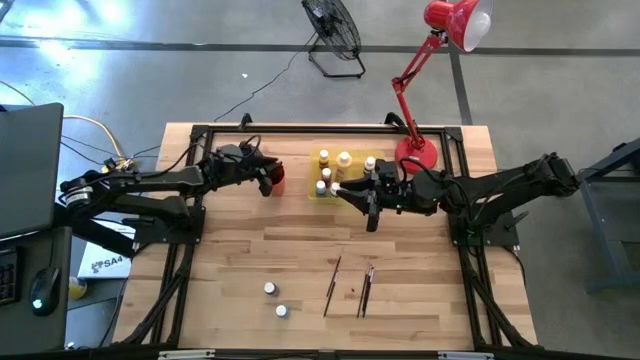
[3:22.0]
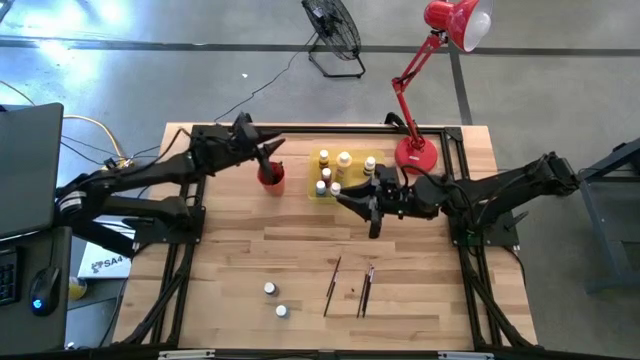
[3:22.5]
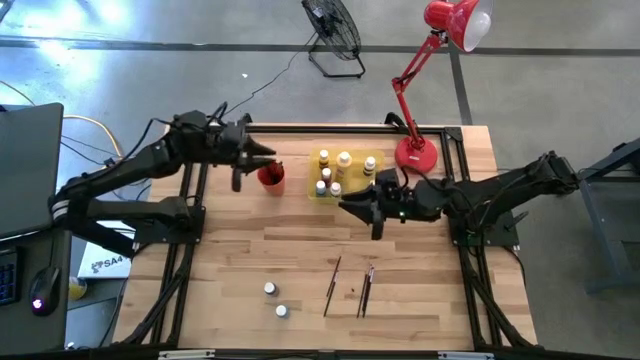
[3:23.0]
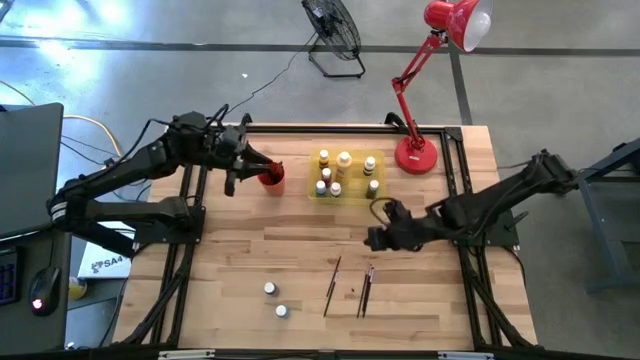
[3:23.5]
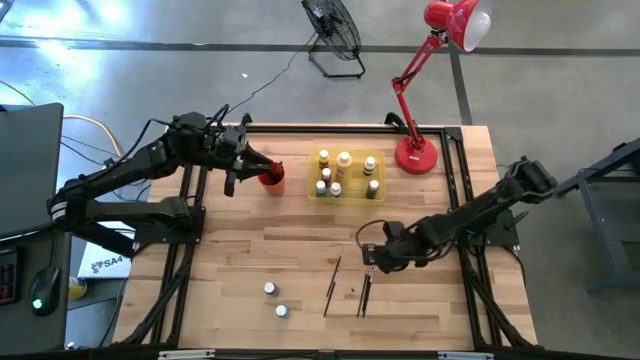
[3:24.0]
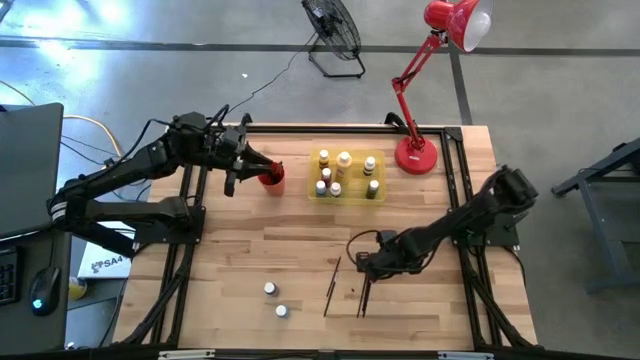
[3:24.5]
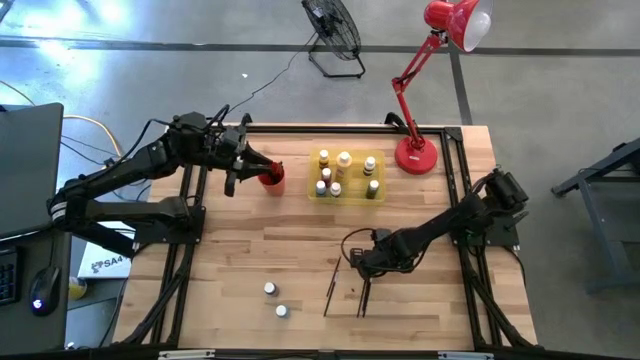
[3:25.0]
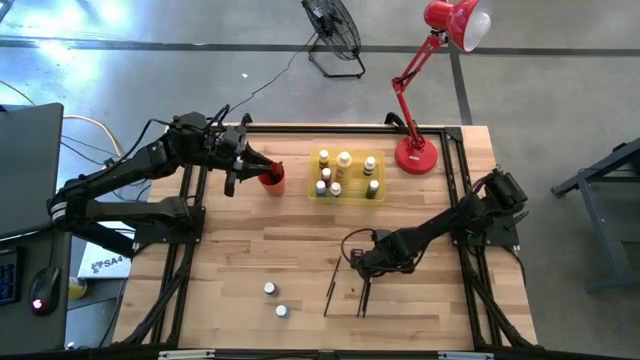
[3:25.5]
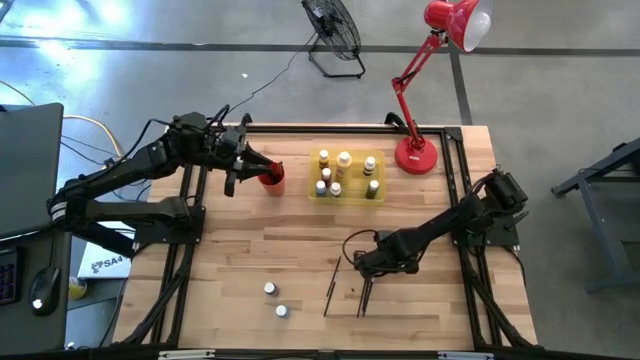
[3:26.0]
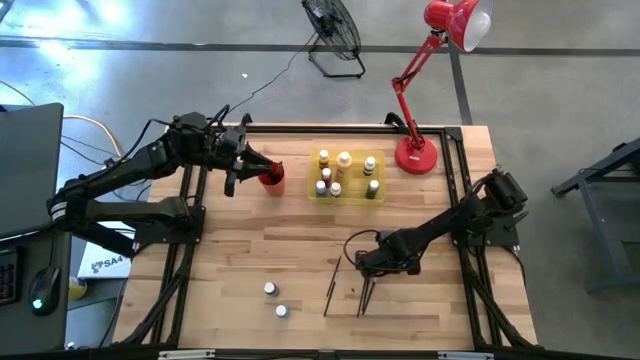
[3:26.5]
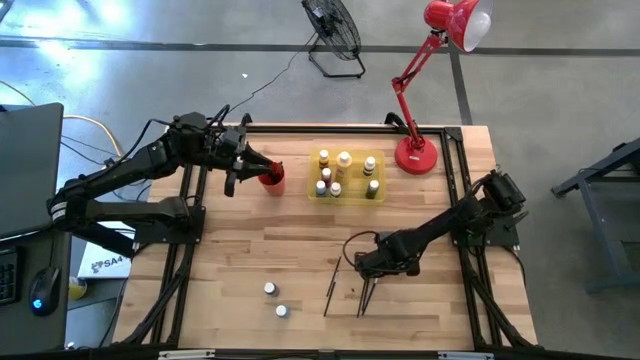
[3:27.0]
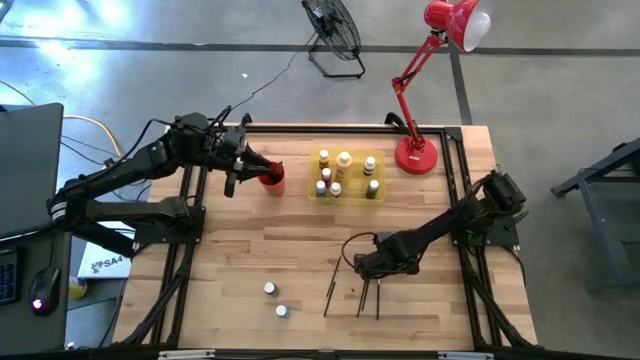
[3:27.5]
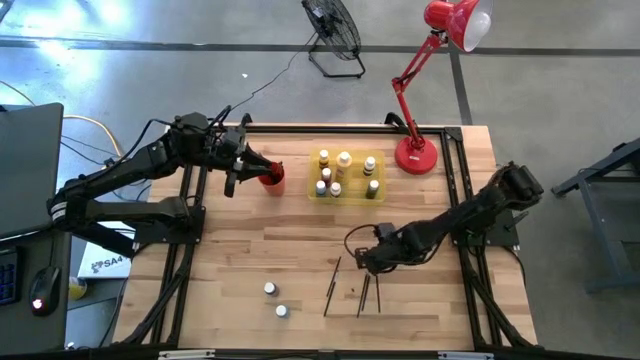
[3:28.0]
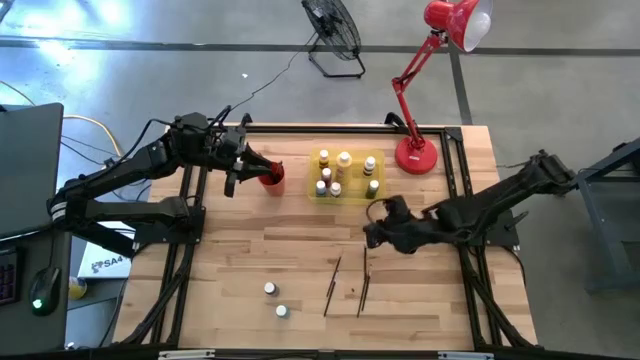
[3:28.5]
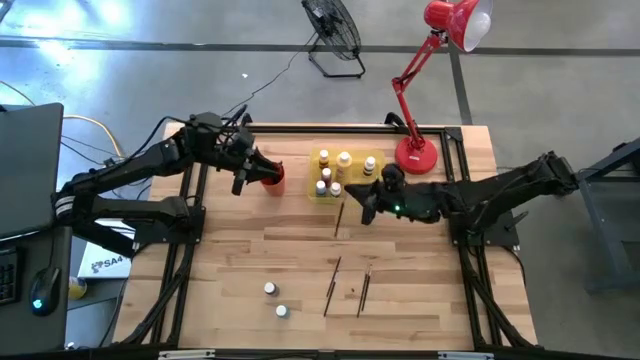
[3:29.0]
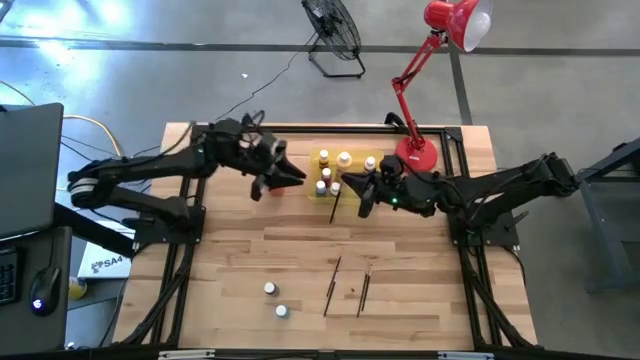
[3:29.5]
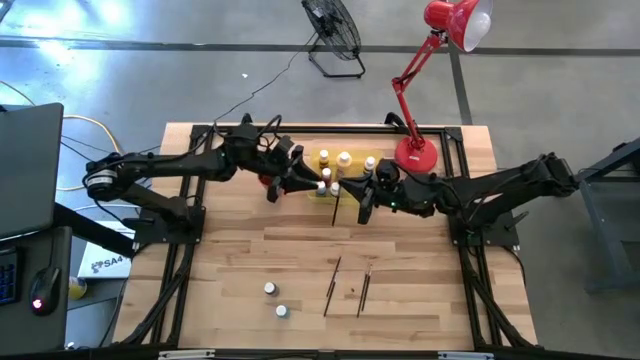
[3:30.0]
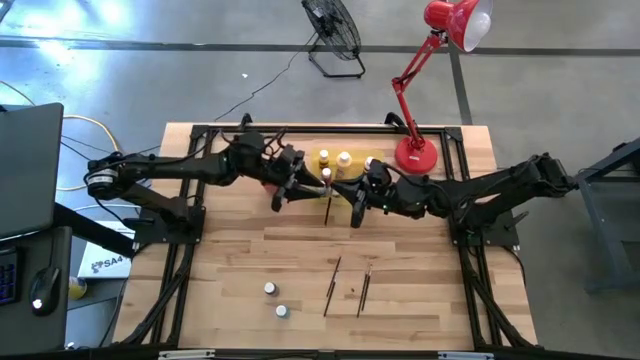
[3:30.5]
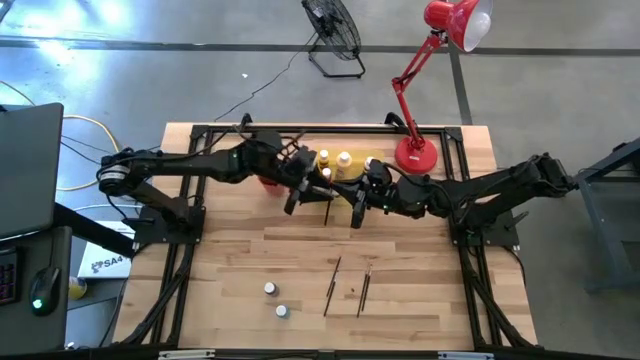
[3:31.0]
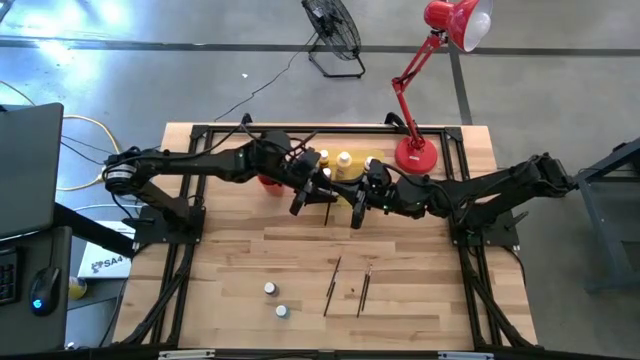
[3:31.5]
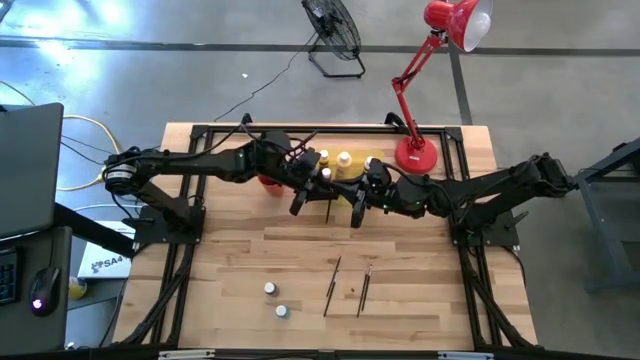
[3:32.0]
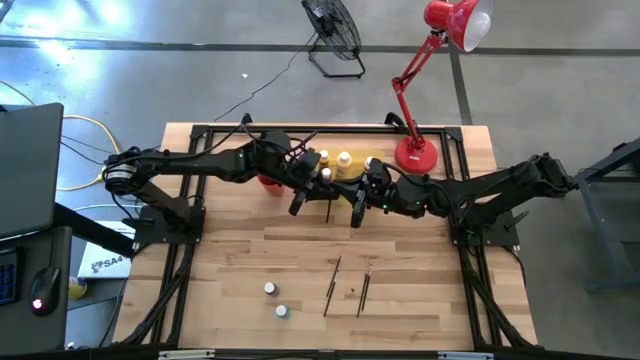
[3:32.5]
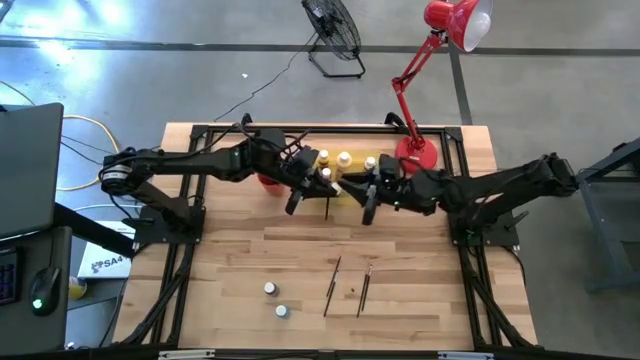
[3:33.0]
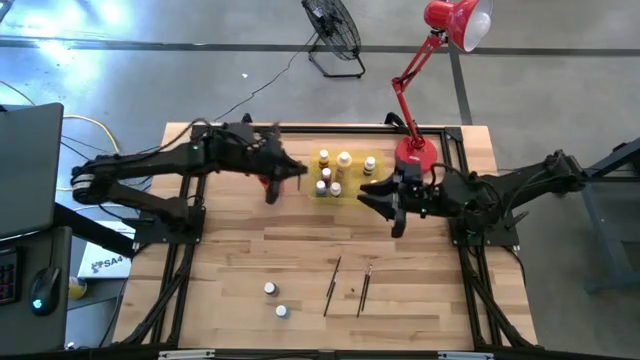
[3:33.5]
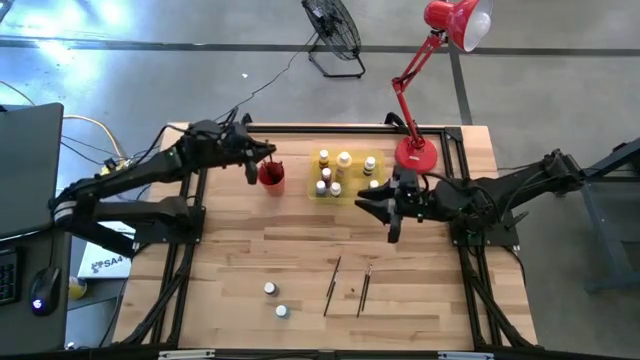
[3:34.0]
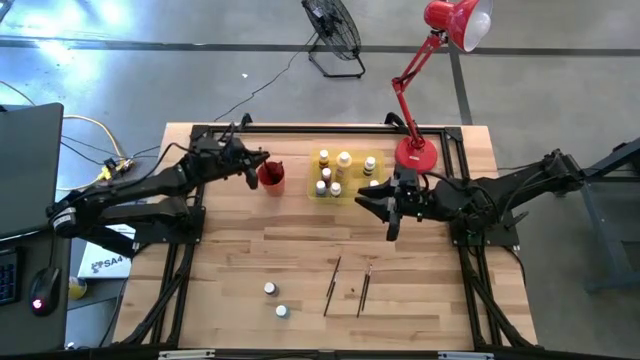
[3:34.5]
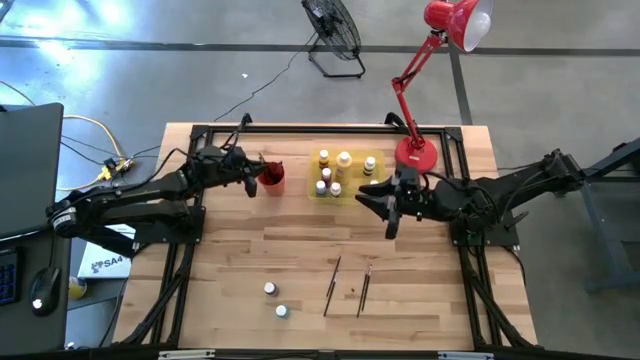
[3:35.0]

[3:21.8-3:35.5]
Task: Pick & Place Paint Supplies
Put the silver paintbrush into the orange cup

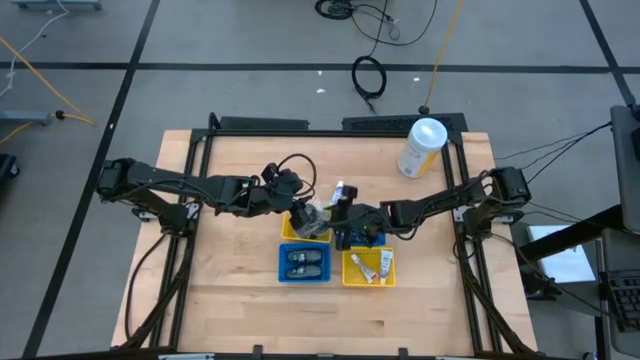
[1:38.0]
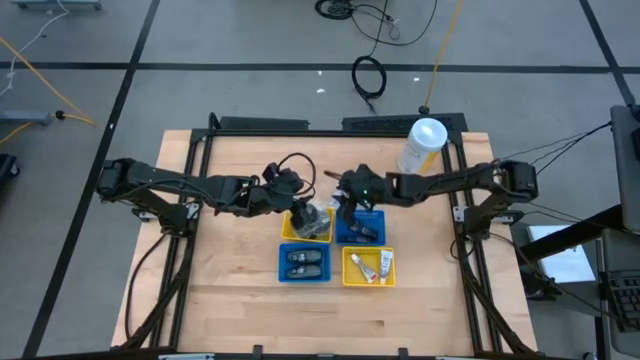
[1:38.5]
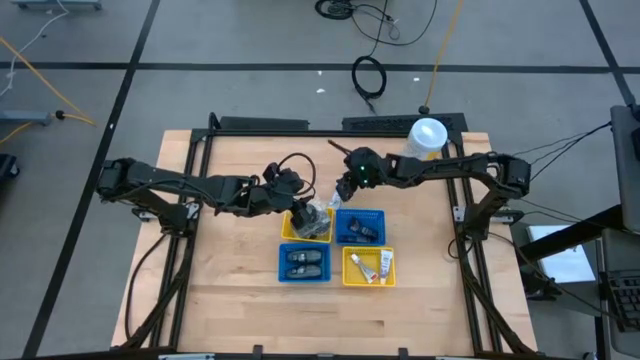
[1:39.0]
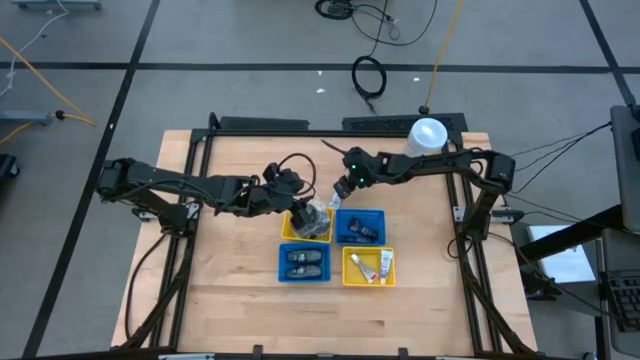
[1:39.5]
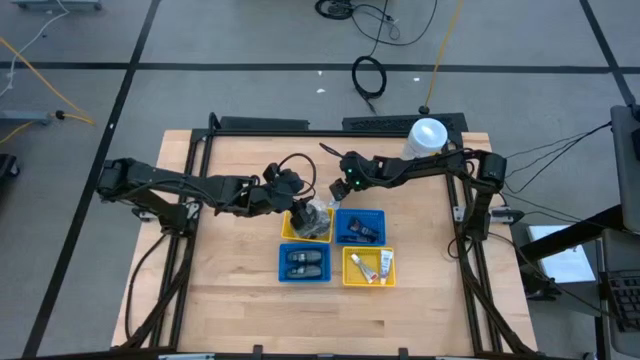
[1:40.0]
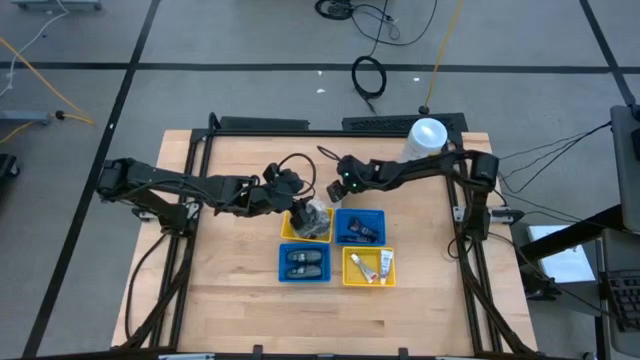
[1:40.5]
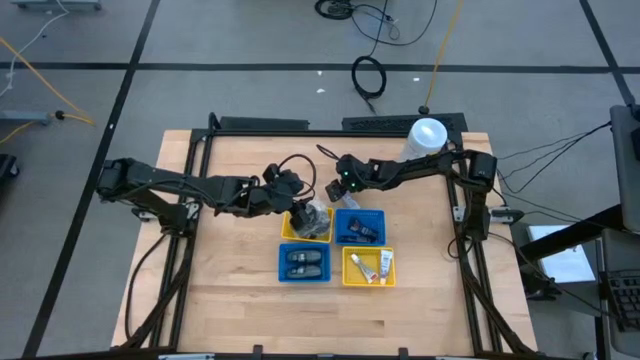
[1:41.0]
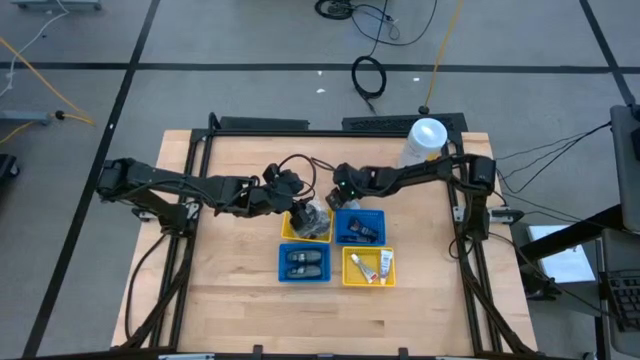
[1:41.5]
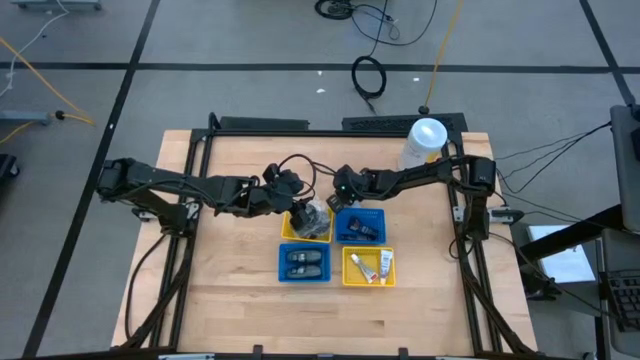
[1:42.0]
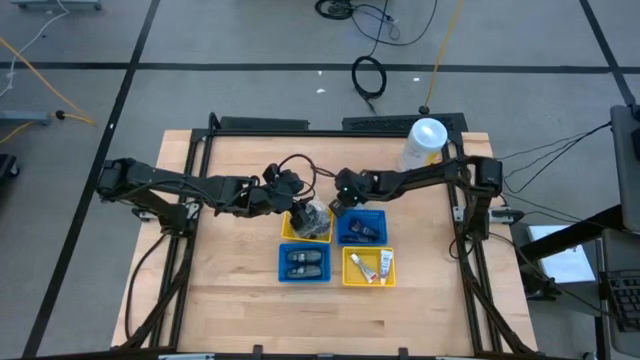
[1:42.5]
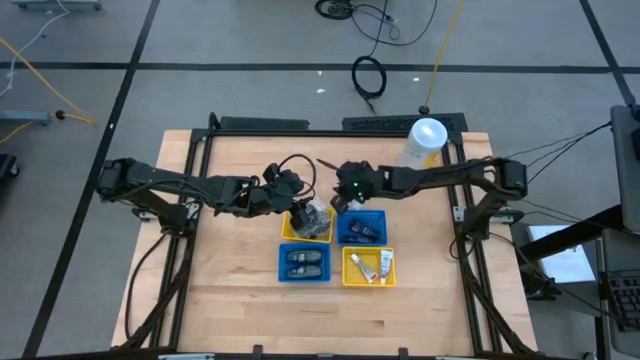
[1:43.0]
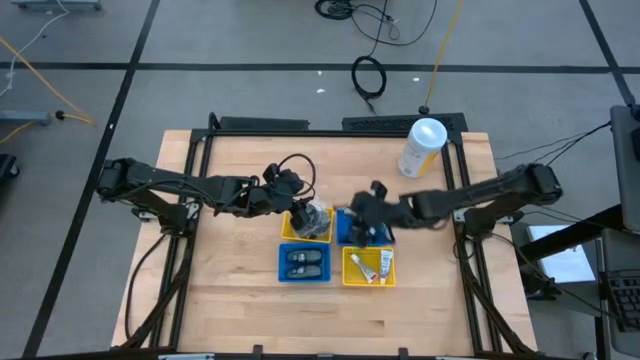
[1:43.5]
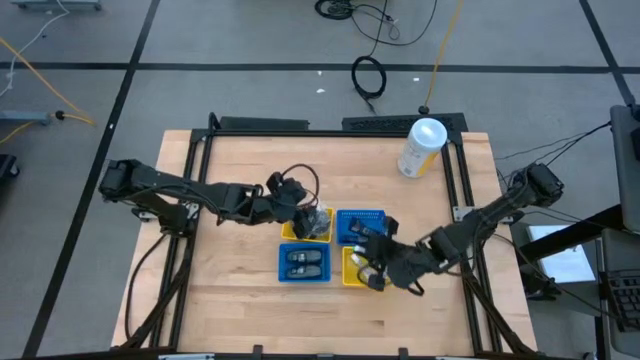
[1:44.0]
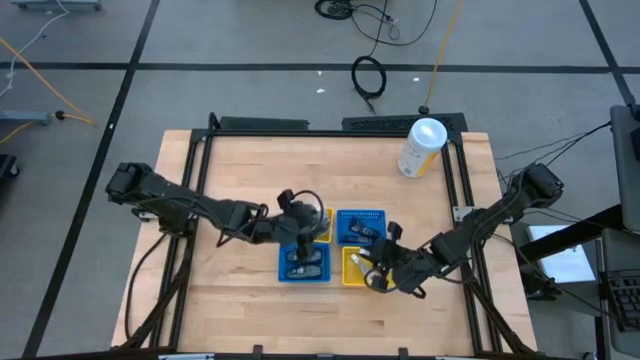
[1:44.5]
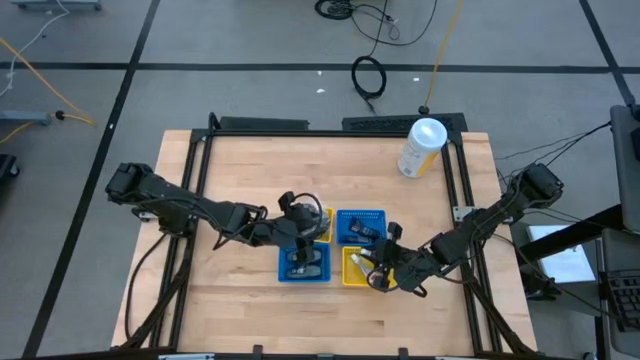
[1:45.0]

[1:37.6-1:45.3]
Task: Pick & Place Travel size toiletries
Put the white toothpaste into the bottom yellow basket

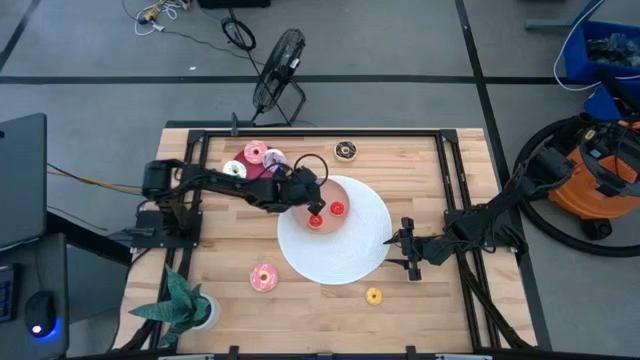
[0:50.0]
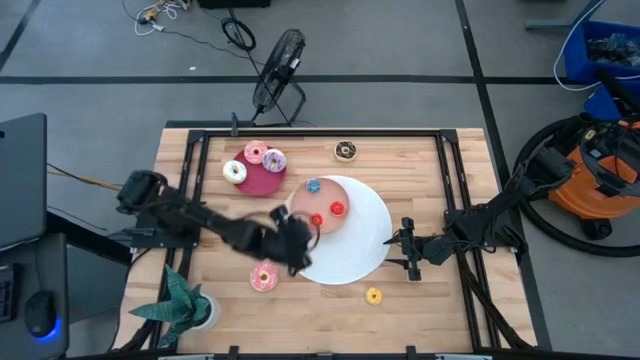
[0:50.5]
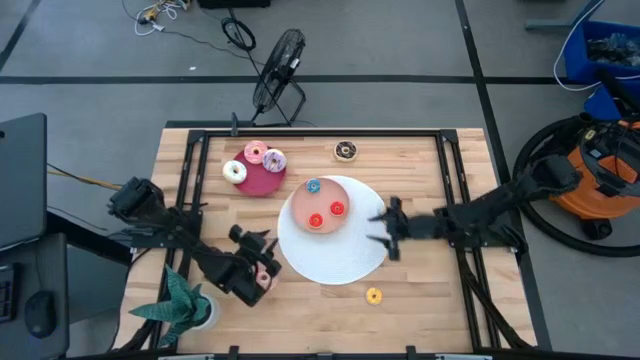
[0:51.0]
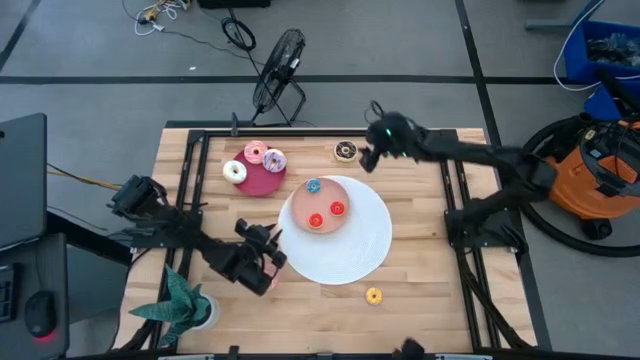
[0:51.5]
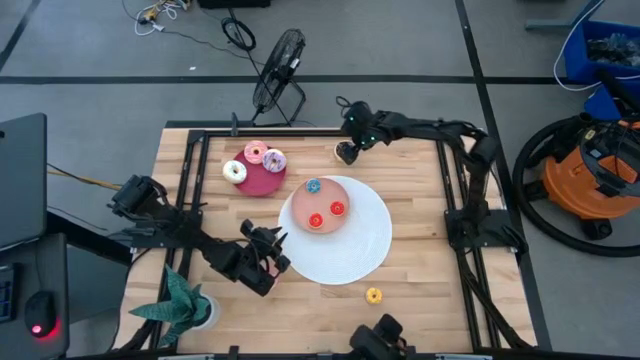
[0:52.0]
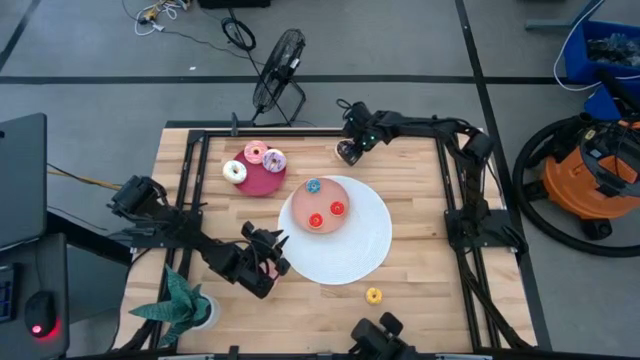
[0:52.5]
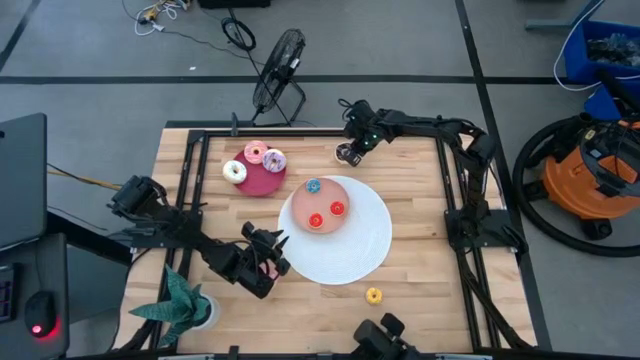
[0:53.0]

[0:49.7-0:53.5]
Task: Pick & Place donuts
Put the big brown donut on the dark pink plate
